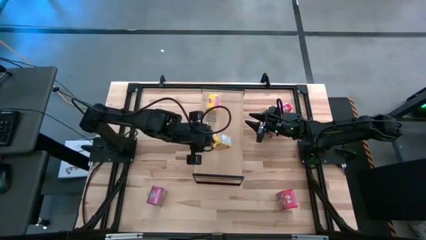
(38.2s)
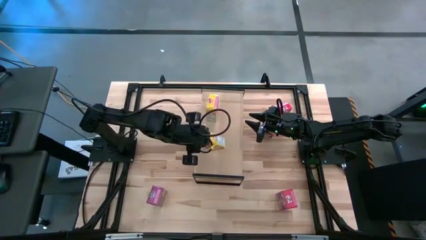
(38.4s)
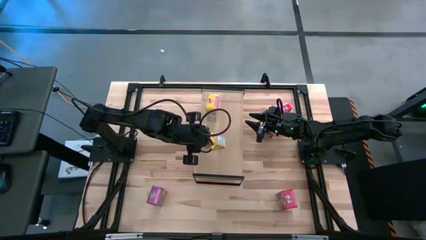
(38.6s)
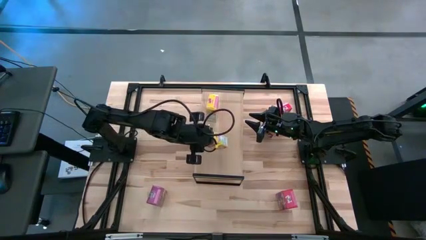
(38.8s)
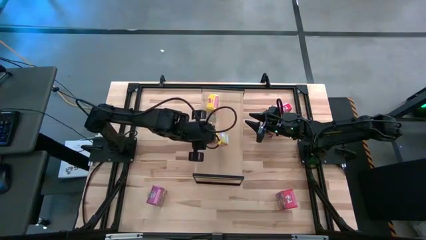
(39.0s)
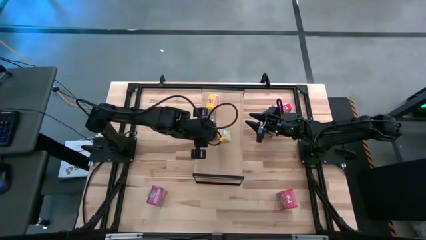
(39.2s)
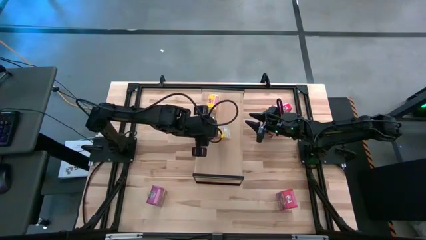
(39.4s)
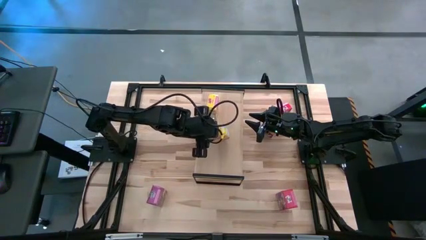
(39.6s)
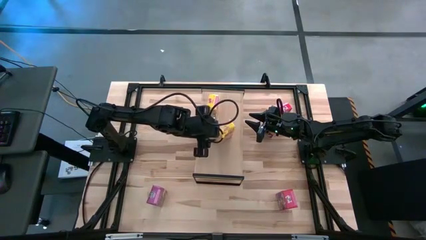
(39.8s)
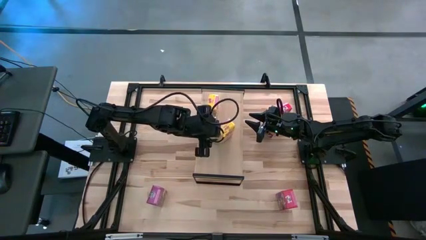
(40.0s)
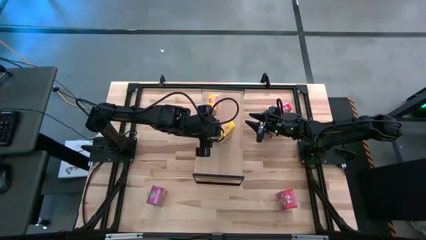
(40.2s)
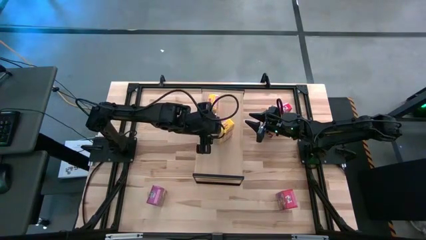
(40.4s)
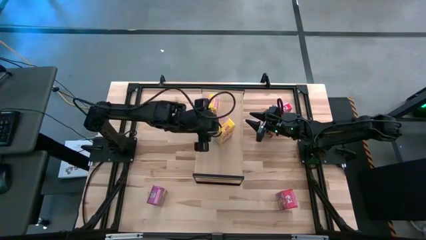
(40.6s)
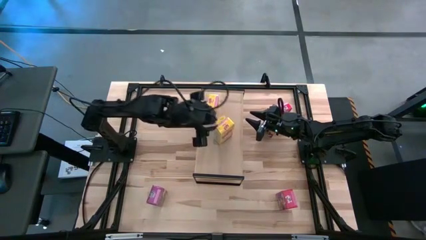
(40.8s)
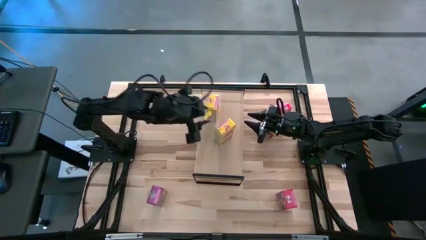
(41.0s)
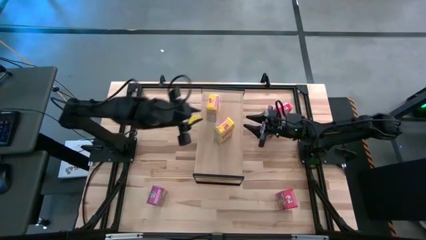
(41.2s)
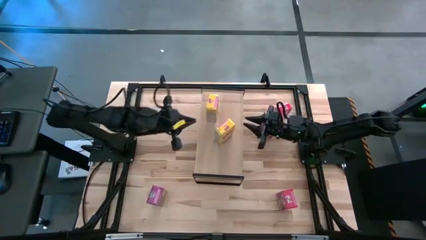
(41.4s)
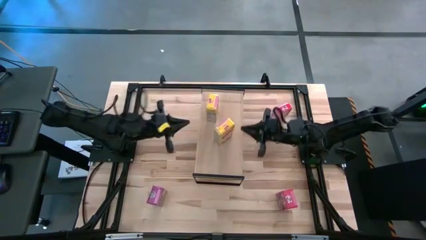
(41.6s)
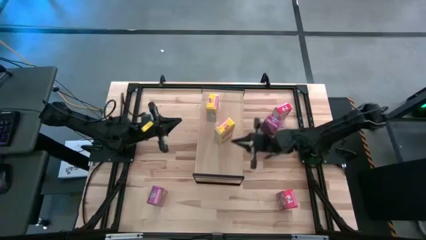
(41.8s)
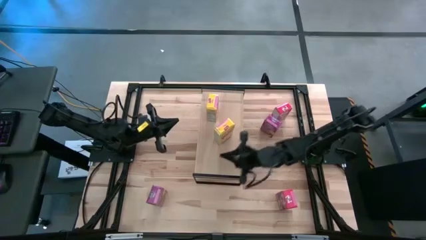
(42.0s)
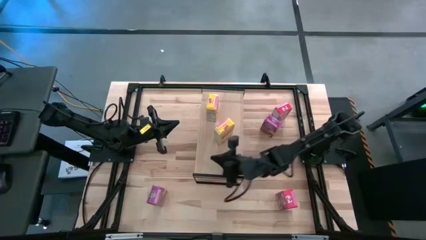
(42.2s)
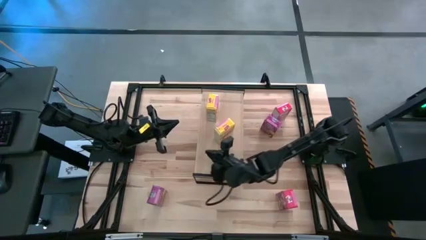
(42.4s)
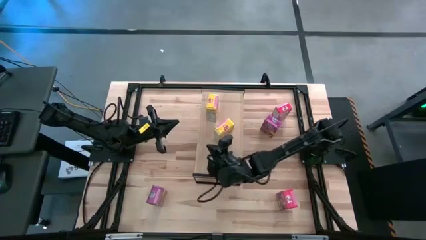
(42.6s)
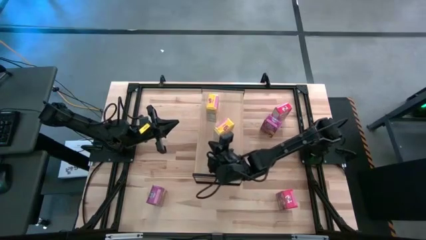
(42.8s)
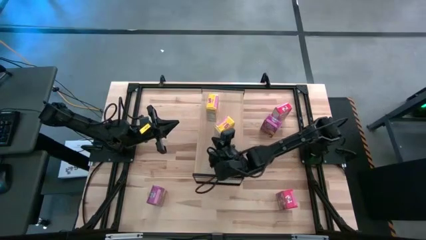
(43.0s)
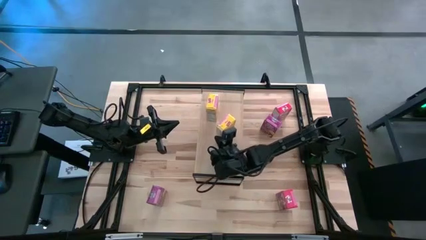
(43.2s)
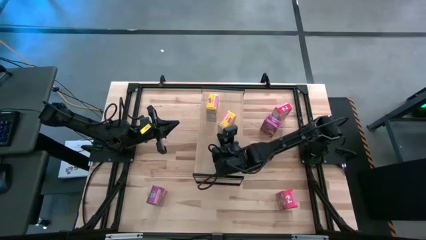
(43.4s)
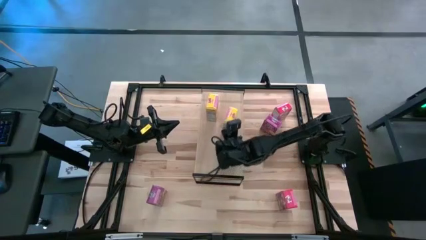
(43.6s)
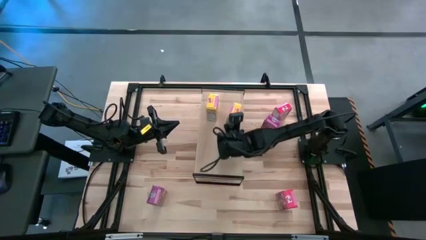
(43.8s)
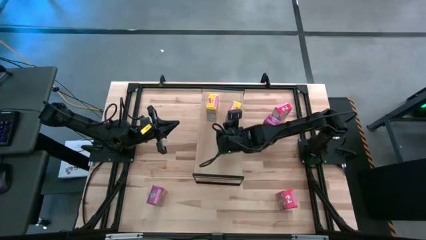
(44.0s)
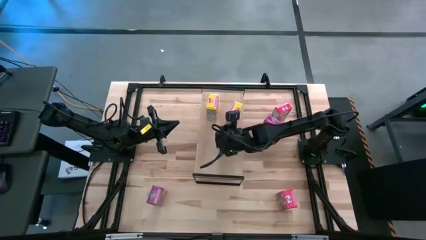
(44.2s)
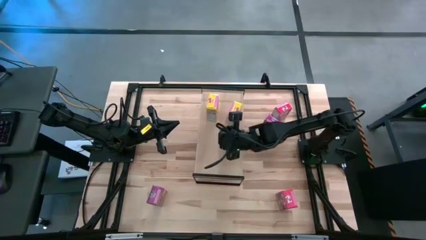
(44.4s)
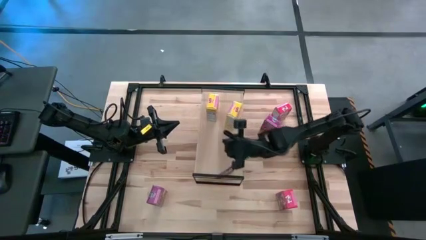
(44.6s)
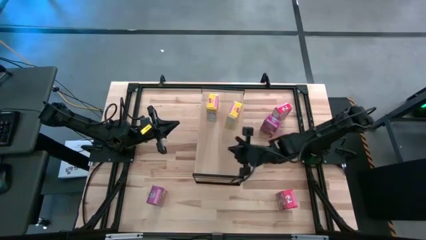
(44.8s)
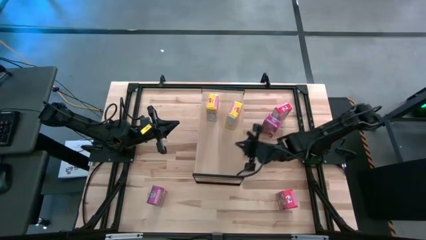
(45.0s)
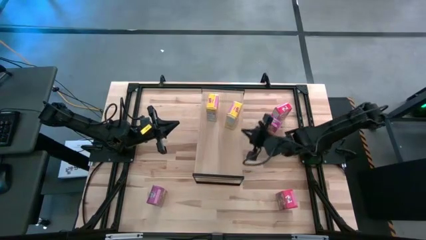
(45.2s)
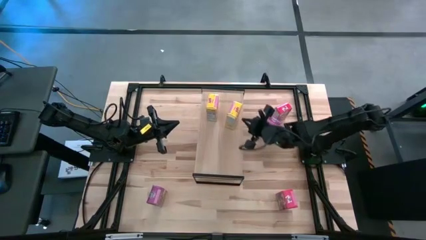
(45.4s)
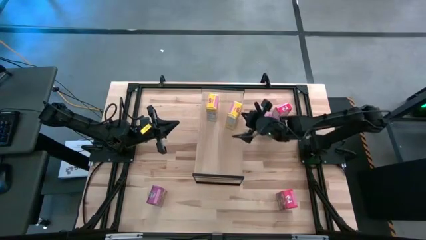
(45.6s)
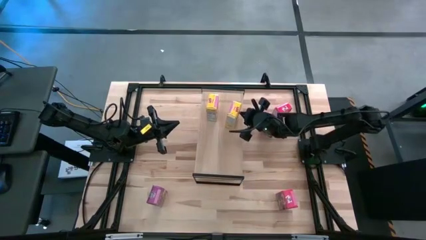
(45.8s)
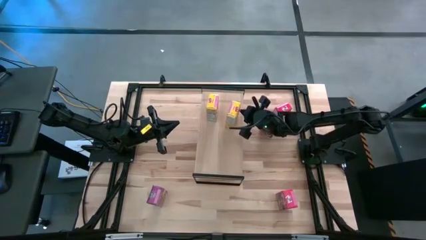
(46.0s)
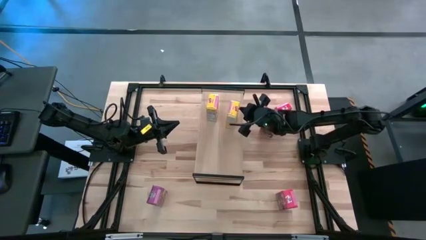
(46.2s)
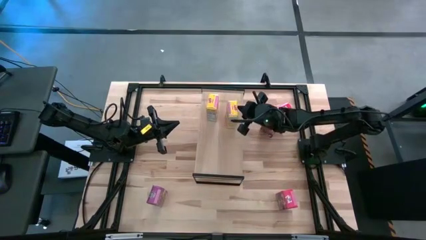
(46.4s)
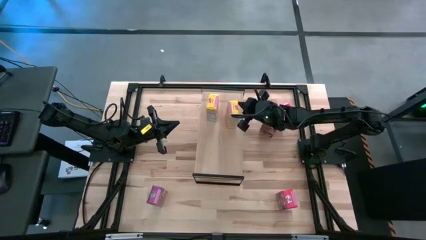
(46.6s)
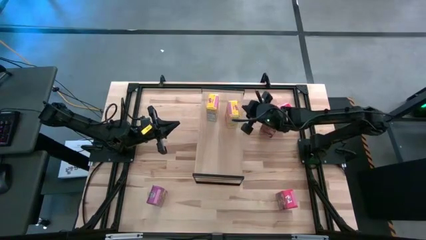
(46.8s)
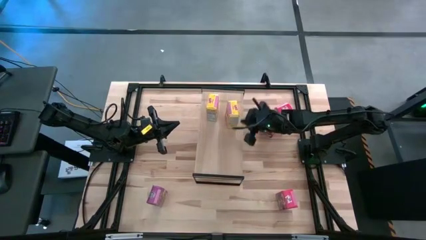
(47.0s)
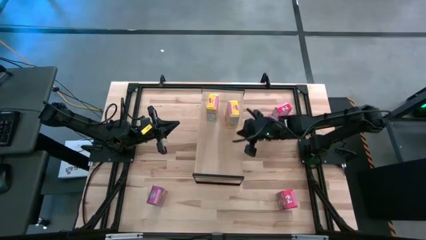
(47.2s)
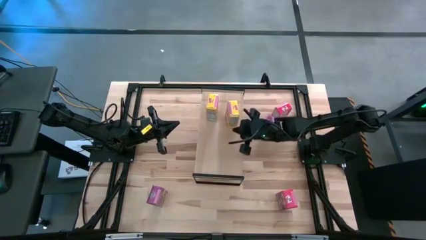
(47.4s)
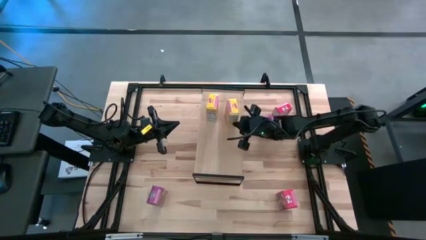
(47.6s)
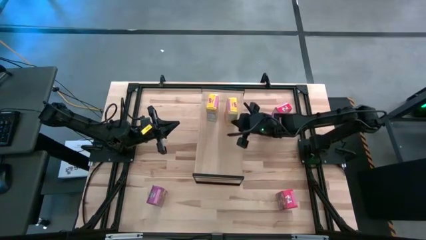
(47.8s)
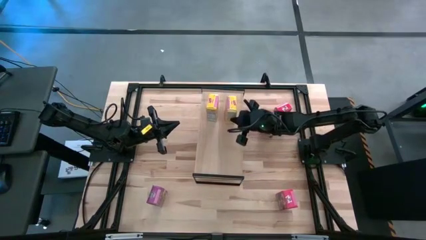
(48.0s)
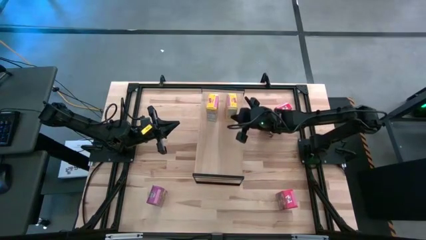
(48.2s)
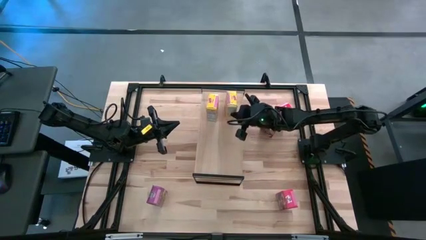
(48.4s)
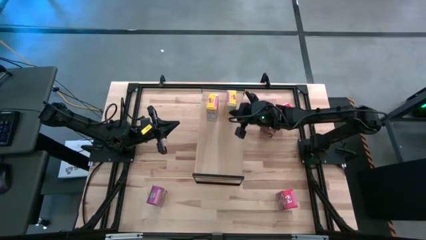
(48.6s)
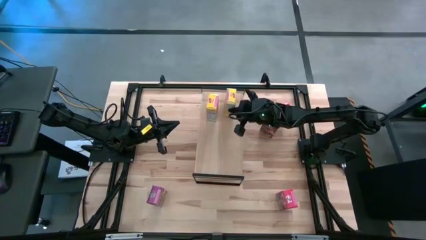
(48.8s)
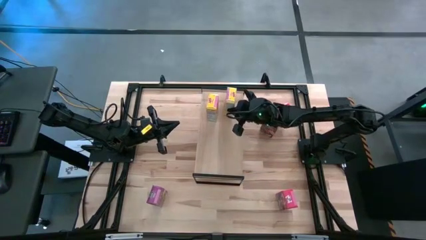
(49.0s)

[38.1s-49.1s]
Task: Stack cereal on shelf
Put the yellow cereal box on the shelf

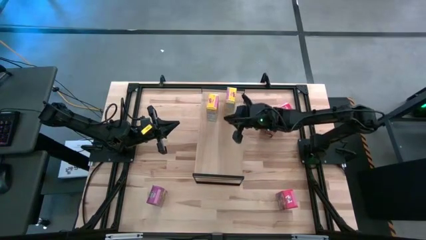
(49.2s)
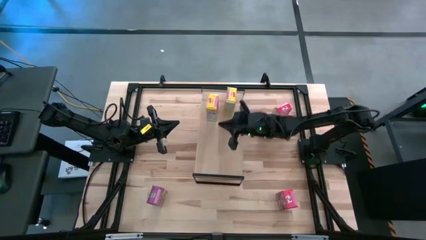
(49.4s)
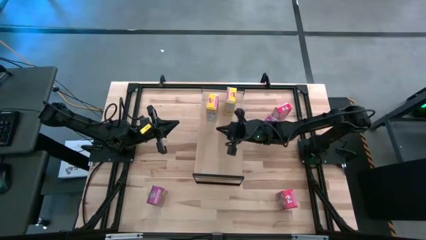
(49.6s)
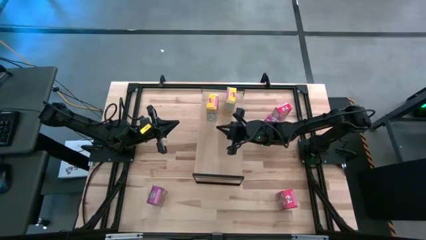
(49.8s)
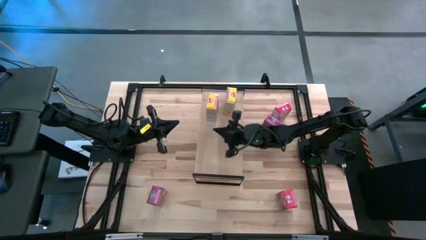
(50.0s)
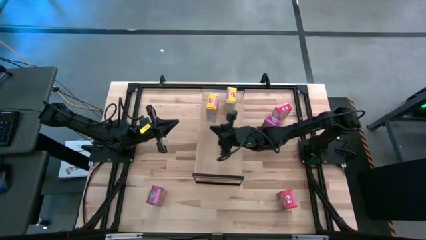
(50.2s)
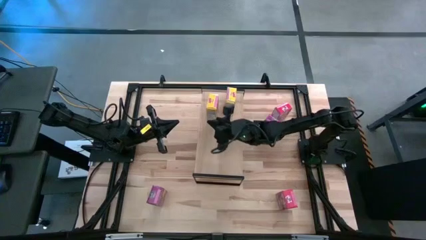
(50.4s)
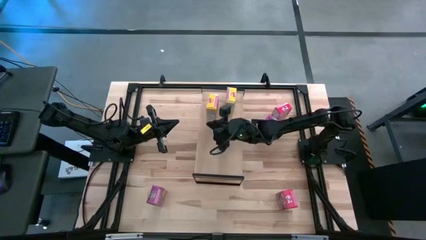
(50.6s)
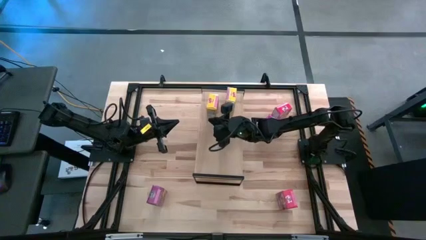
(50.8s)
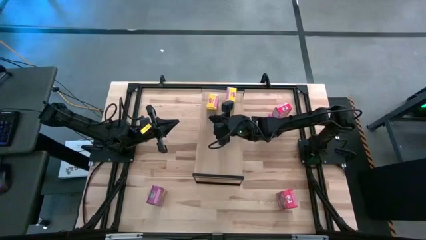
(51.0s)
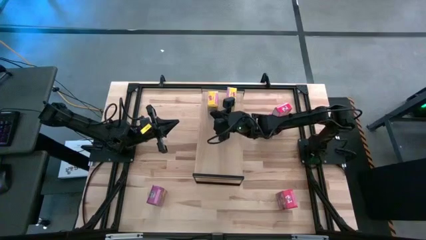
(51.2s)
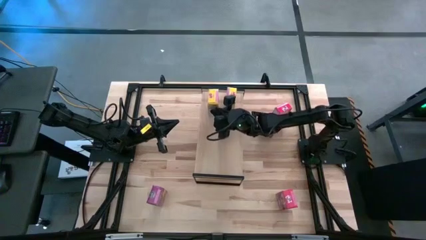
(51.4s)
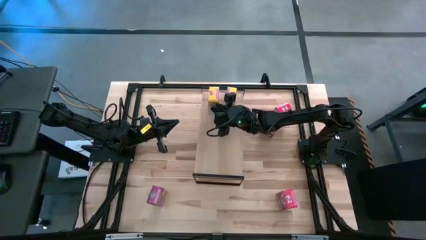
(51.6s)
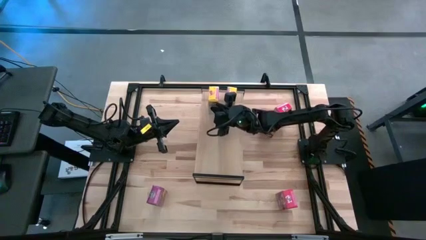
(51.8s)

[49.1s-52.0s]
Adjust the left yellow cereal box on the shelf

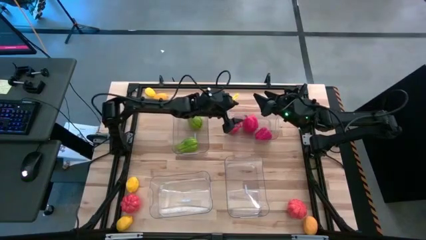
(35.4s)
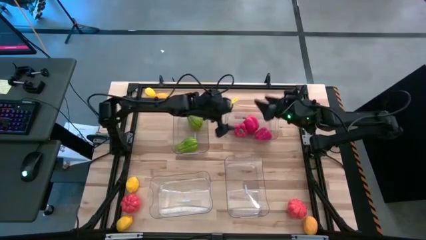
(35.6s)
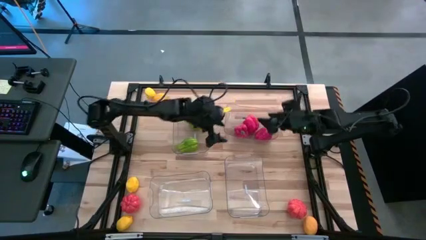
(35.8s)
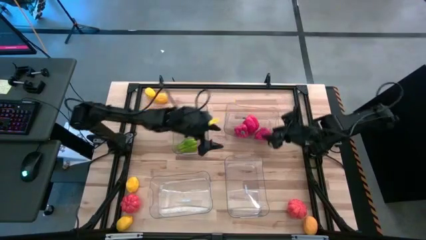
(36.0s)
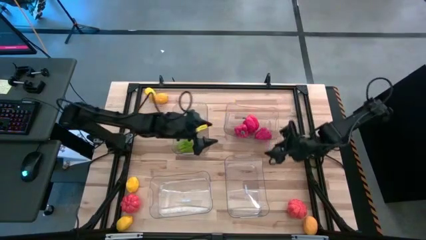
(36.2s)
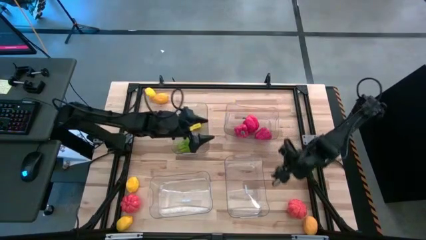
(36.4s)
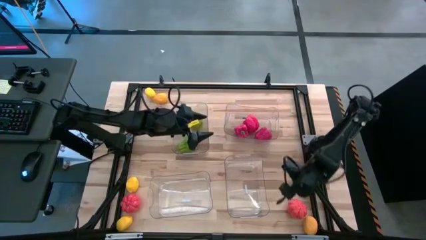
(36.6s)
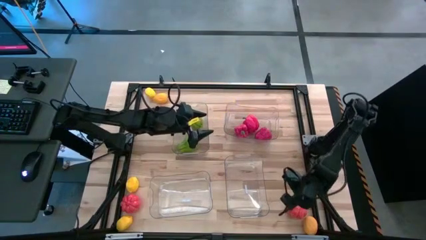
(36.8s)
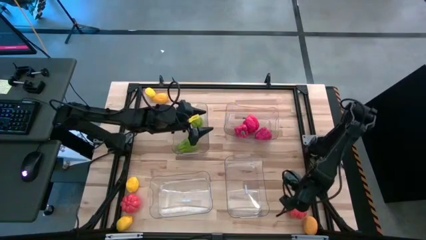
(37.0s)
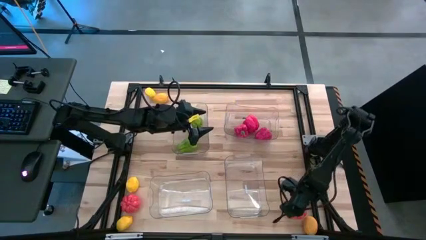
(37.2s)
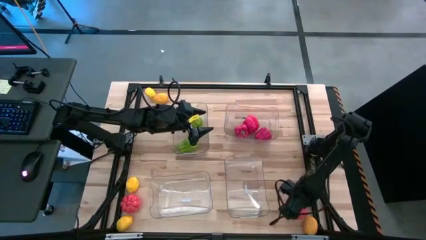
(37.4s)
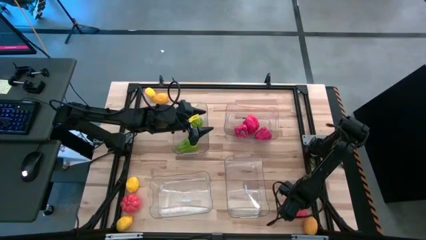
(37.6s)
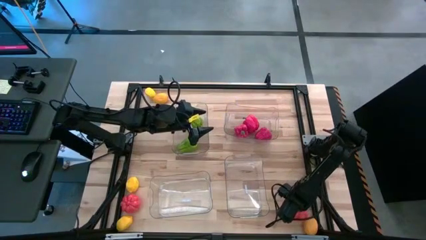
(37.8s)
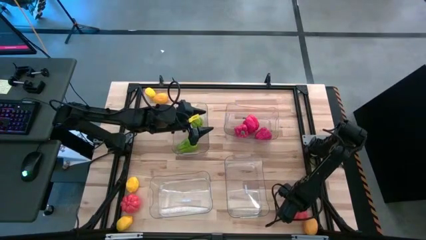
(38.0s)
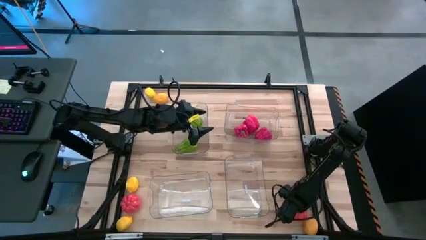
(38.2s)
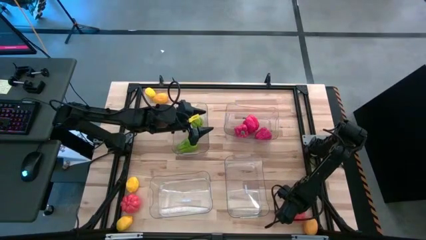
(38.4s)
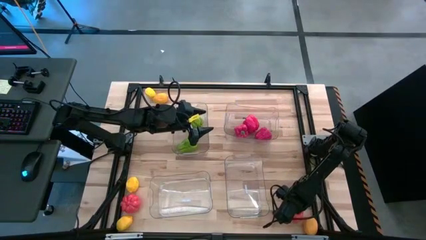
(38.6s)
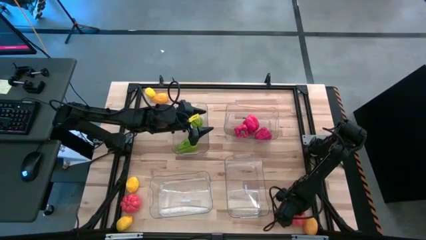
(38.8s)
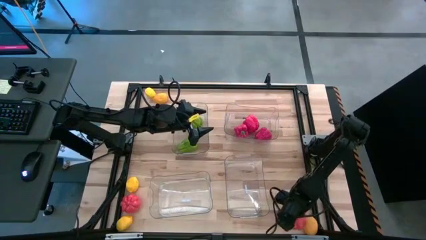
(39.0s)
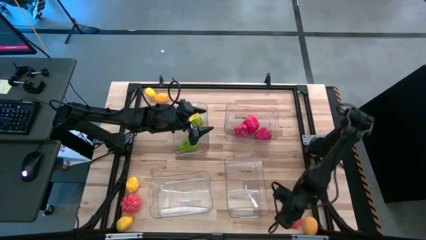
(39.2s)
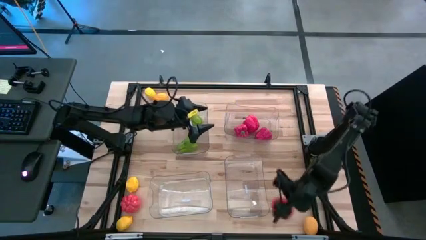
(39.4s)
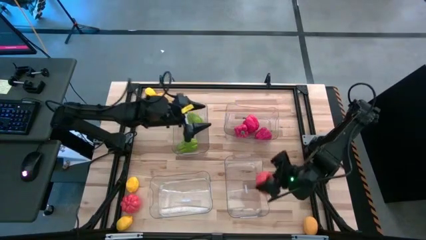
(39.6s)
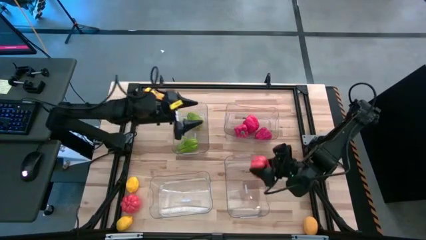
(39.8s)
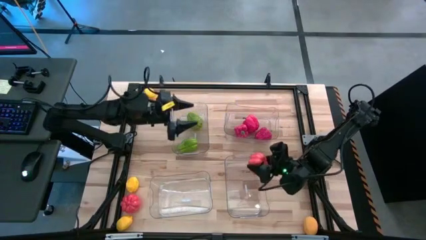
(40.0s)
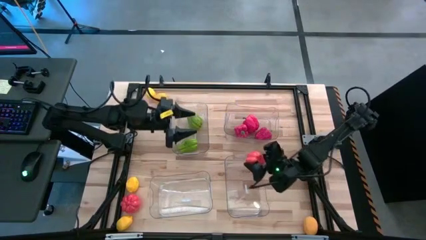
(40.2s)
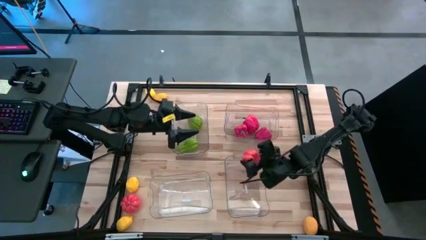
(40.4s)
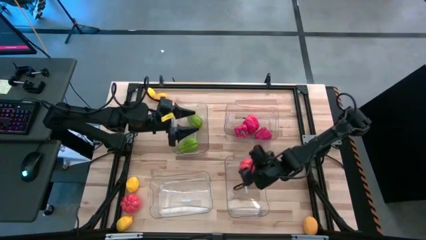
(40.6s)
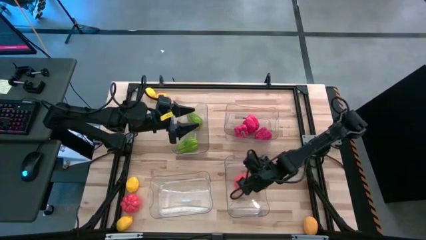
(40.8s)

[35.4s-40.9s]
Task: Sort produce into baskets
Put the right orange pumpkin into the bottom right transparent bin
